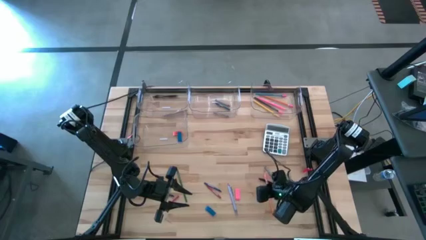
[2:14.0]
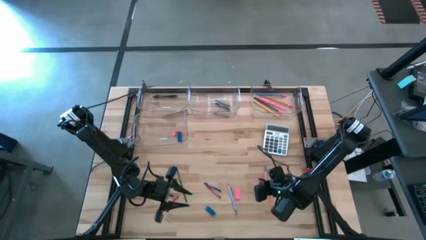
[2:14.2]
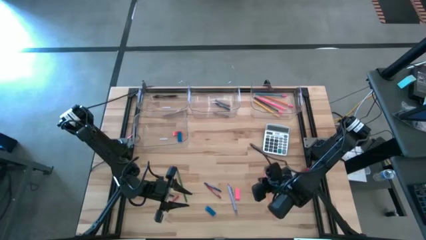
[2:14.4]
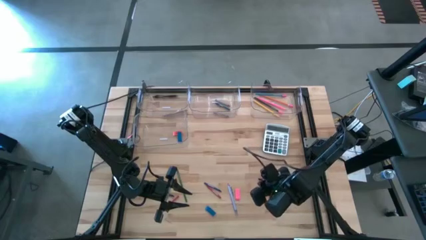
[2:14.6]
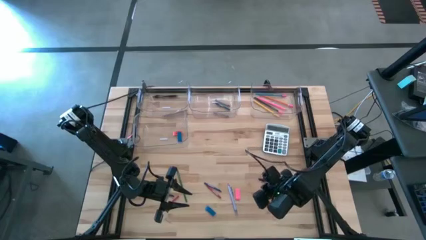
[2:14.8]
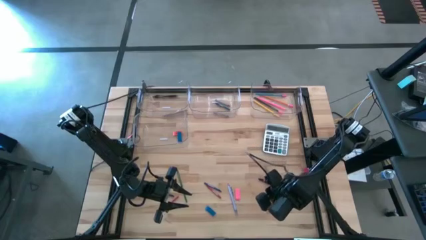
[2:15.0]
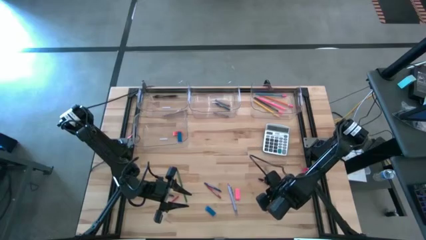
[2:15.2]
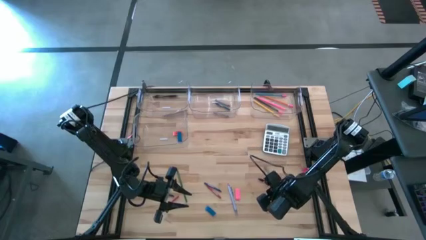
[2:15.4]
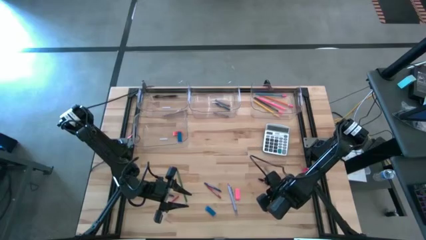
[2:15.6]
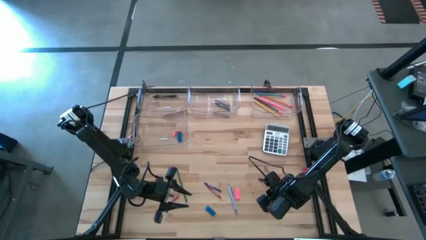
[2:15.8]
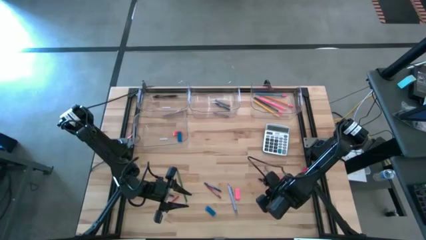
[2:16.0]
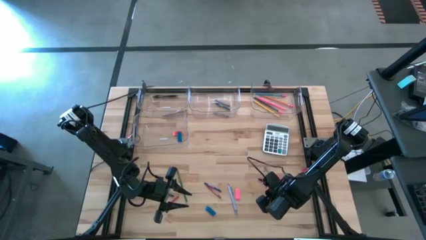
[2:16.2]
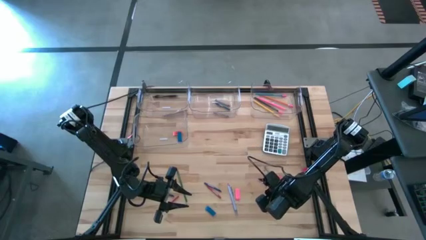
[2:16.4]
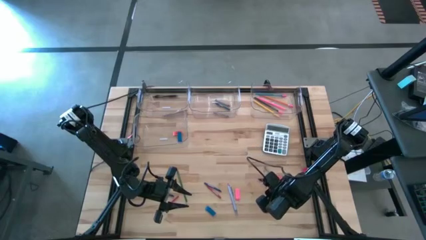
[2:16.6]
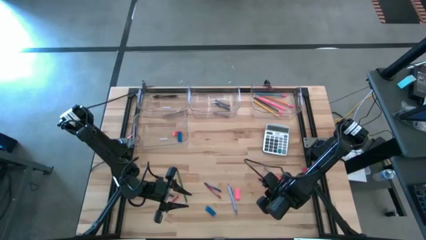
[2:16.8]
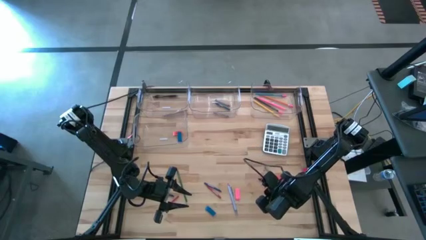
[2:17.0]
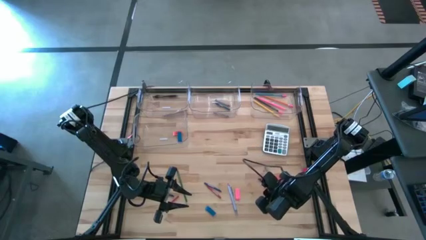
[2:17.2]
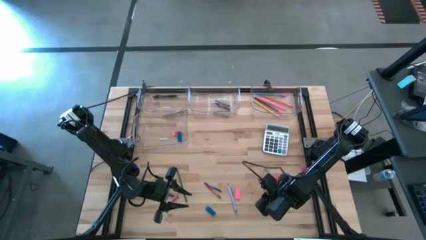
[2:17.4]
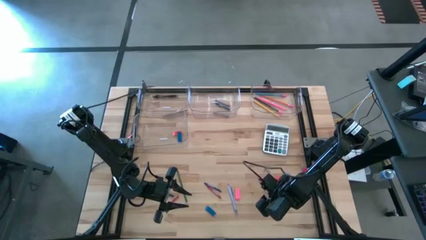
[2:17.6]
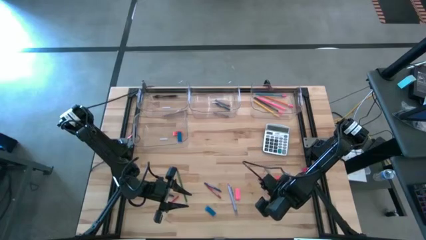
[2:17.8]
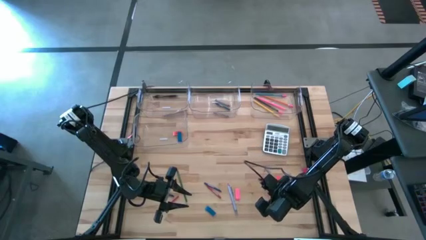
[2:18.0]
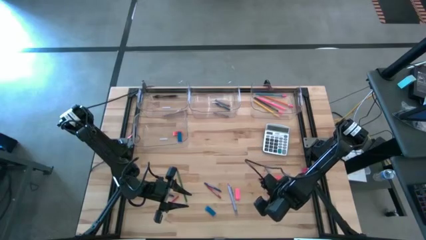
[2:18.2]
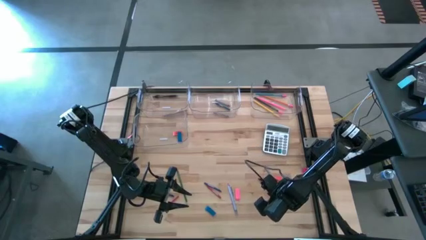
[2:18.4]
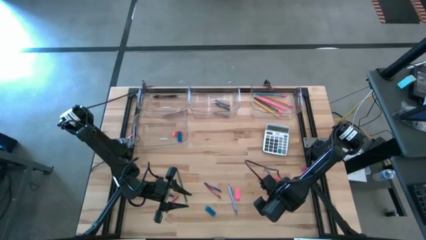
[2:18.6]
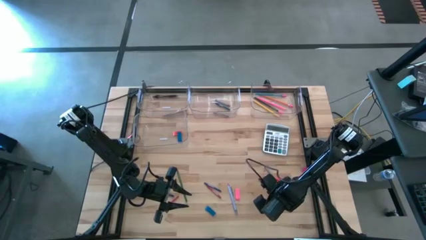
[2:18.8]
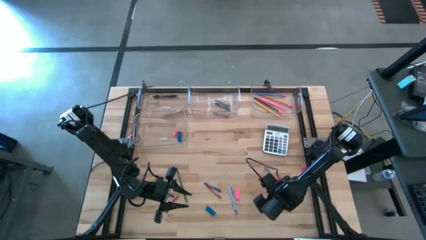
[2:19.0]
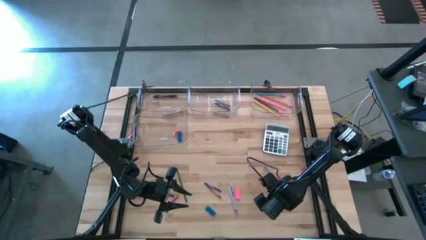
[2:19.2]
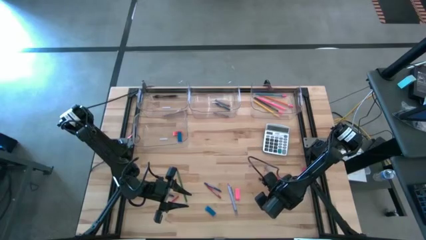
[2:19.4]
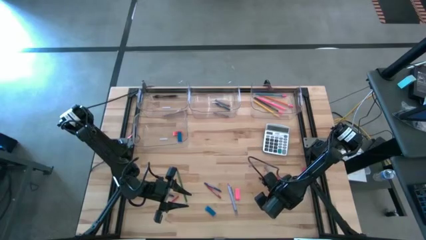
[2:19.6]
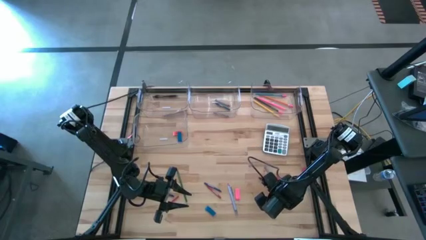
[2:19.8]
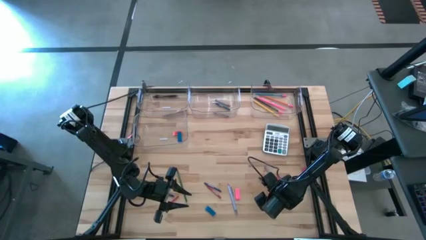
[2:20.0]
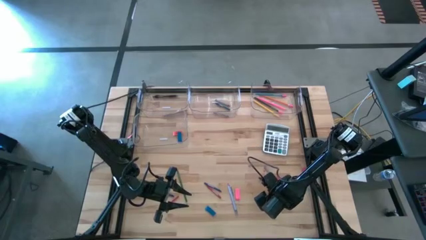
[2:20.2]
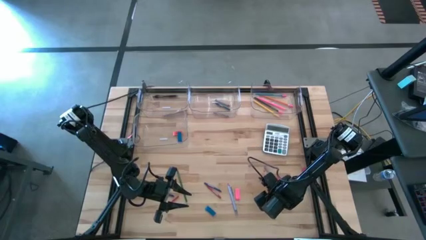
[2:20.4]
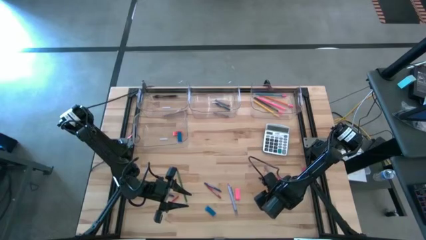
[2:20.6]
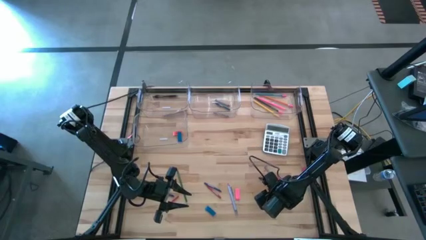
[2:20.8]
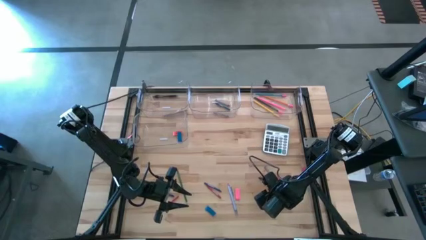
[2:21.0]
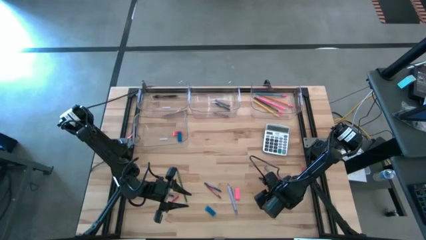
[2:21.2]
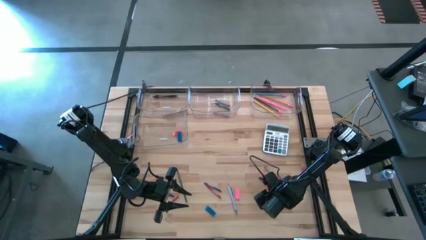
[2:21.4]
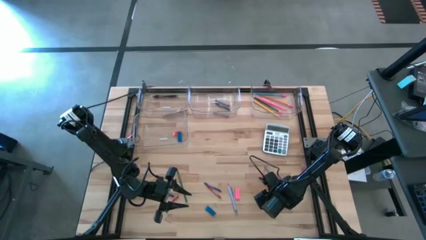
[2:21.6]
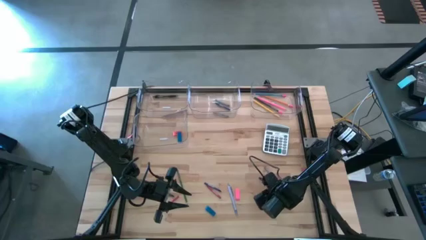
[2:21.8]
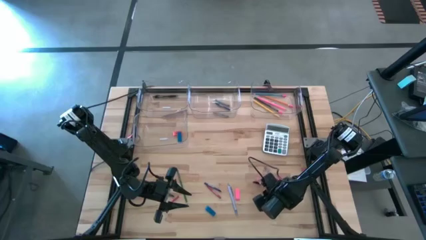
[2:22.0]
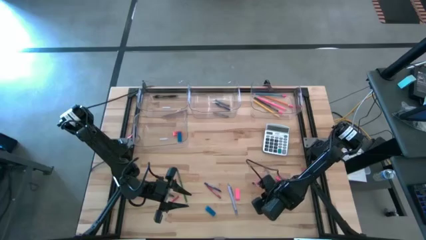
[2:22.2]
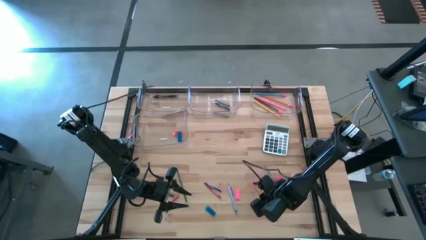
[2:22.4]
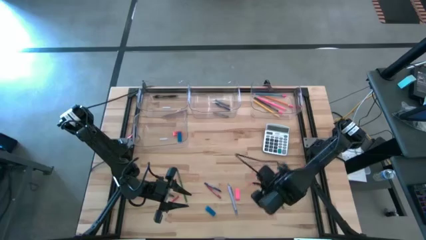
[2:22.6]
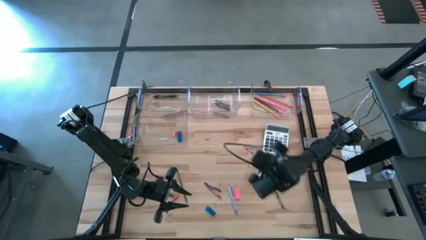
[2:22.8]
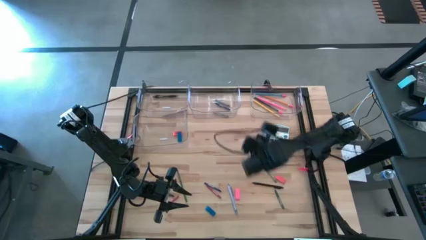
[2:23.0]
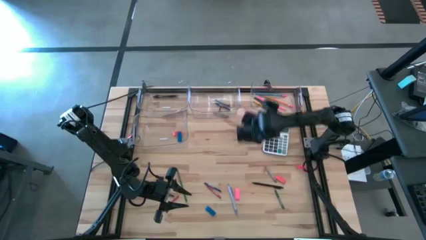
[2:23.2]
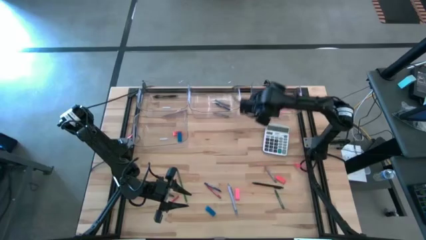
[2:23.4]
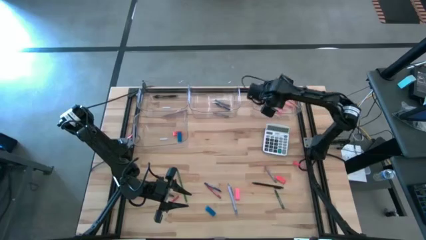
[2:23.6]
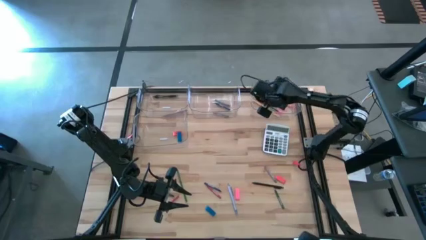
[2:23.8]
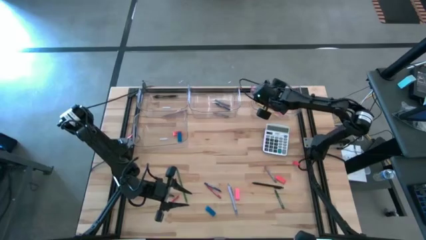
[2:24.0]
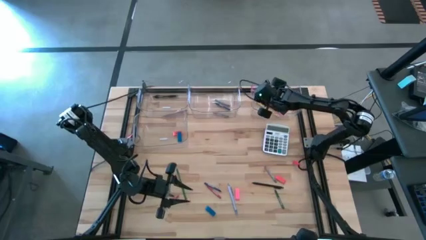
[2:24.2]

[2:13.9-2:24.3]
Task: Sort crayons/erasers/pens/pencils in bins
Put the orange pencil into the top right transparent bin

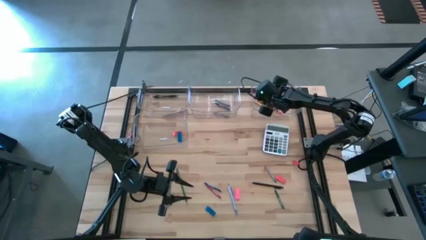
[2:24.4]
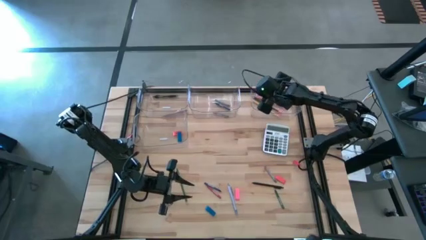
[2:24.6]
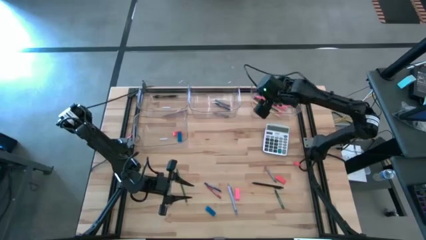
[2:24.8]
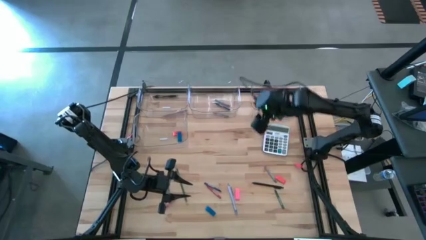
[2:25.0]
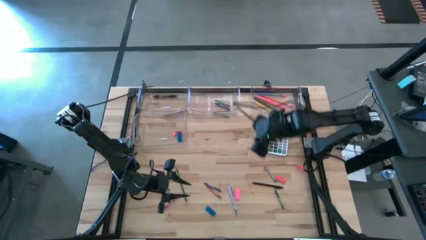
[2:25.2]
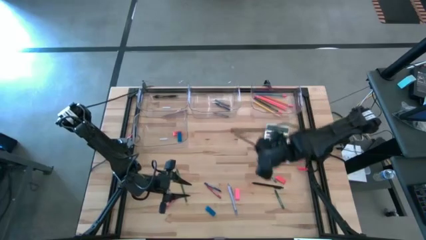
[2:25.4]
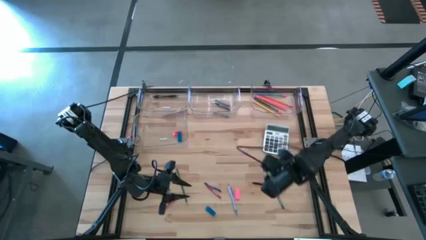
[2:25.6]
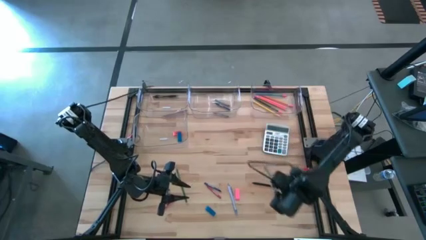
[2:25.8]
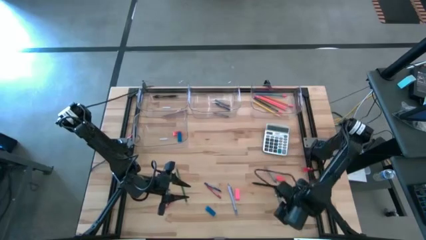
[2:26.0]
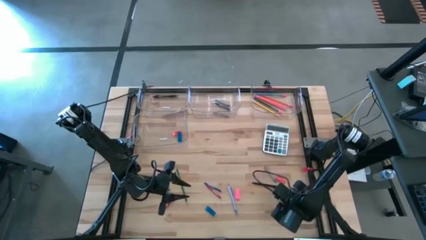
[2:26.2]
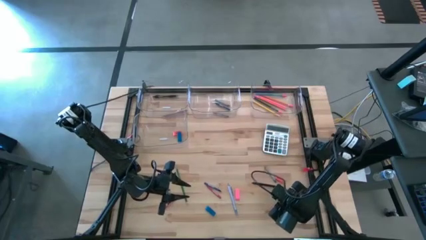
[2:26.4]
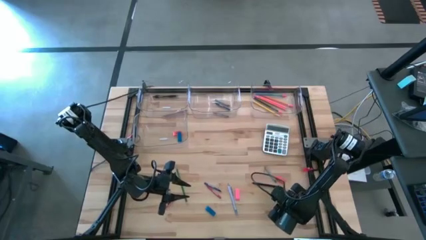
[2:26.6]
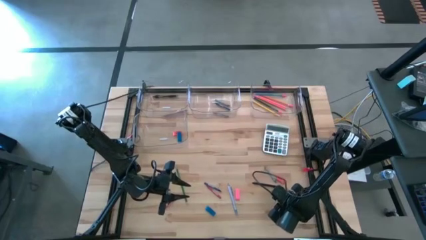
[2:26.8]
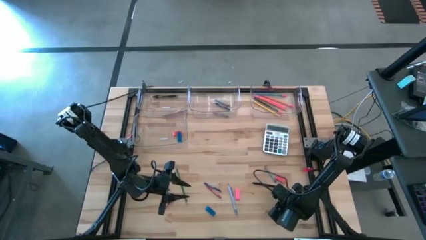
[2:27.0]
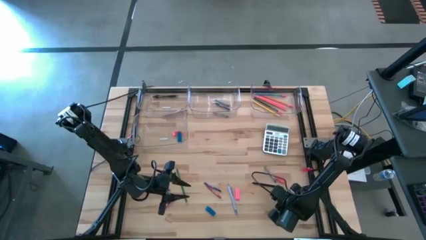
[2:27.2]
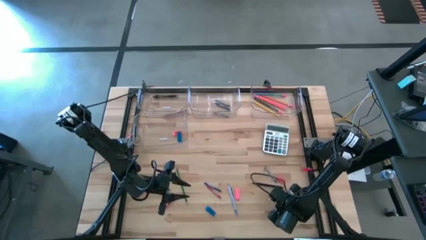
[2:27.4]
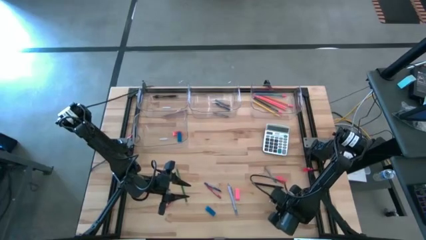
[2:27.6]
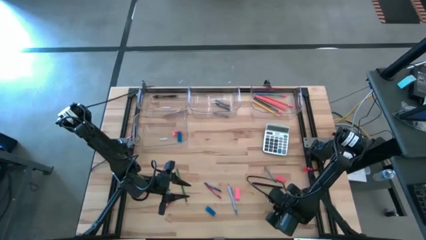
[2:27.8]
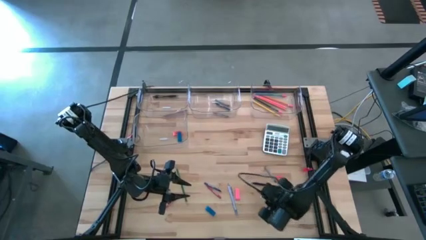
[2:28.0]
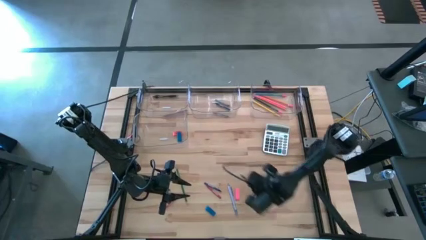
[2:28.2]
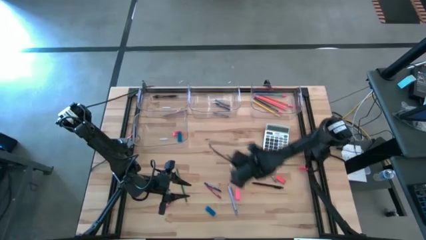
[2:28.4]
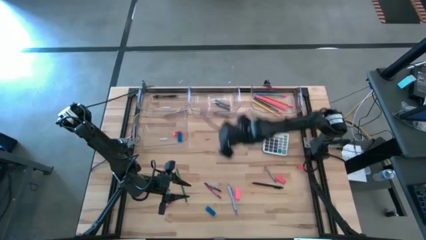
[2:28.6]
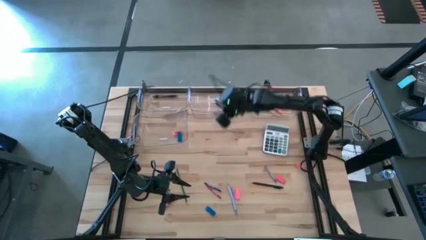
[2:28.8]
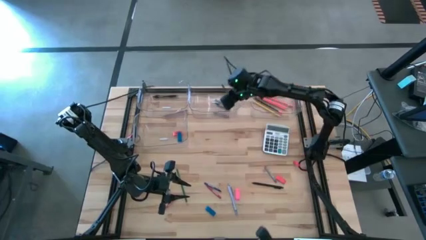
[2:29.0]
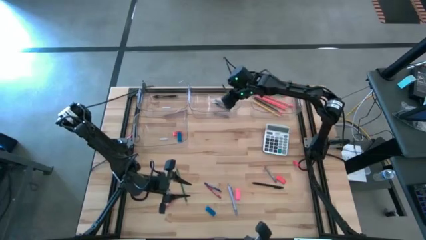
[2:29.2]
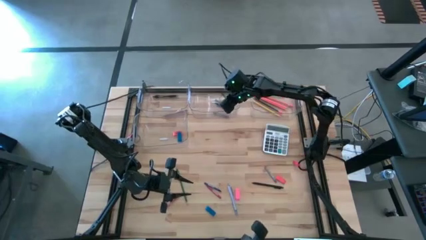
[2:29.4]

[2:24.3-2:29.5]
Put the green crayon into the top center transparent bin

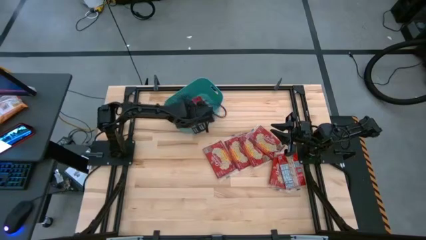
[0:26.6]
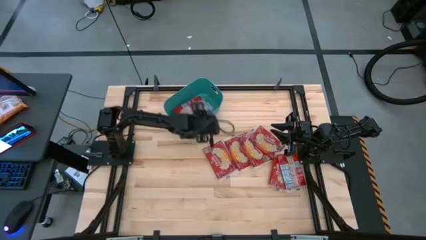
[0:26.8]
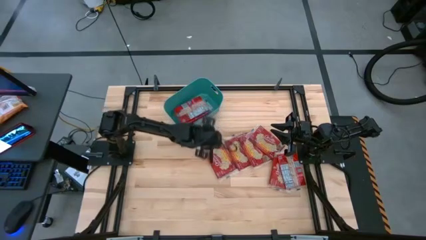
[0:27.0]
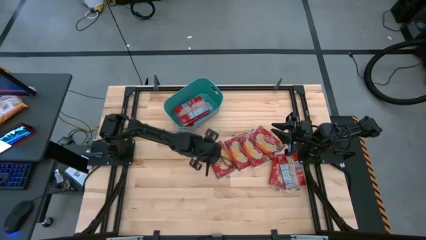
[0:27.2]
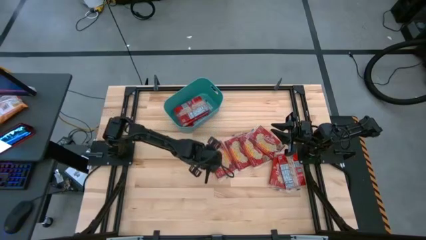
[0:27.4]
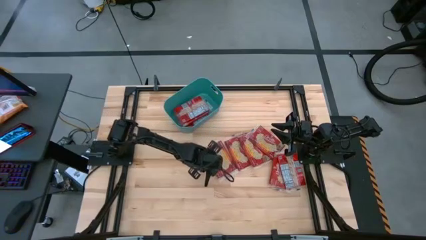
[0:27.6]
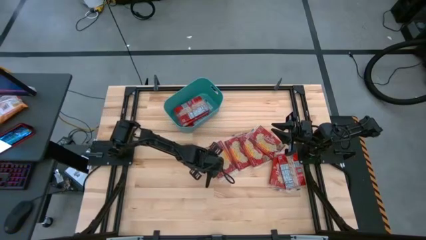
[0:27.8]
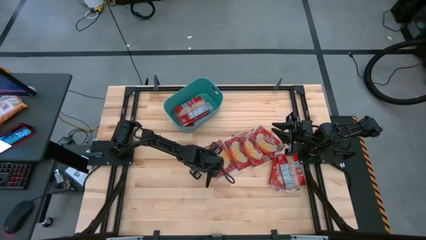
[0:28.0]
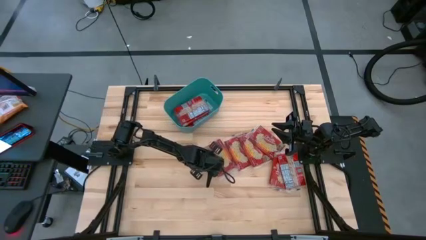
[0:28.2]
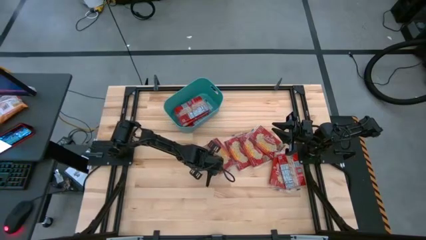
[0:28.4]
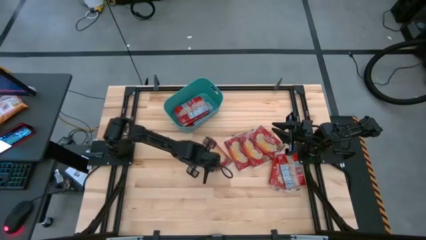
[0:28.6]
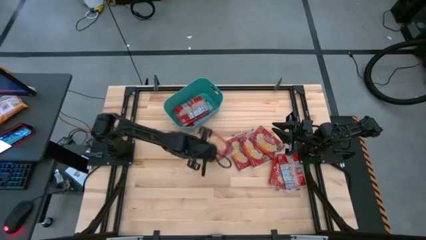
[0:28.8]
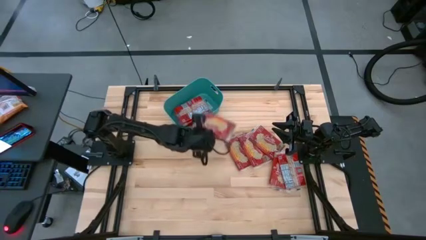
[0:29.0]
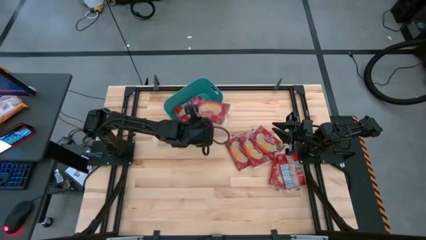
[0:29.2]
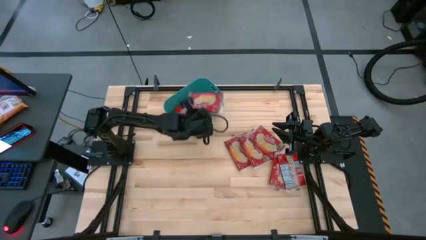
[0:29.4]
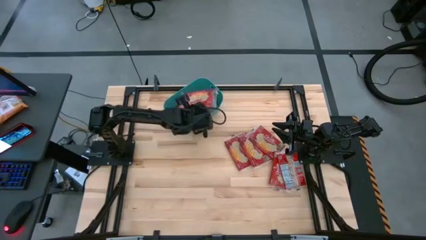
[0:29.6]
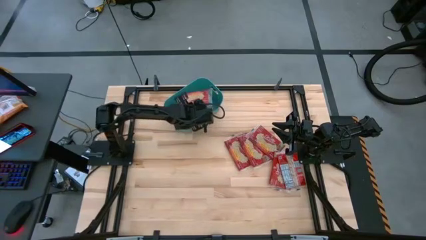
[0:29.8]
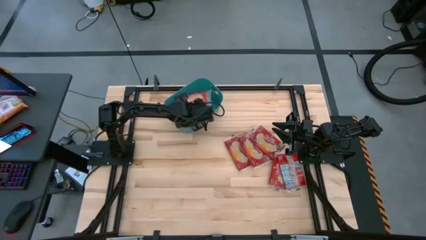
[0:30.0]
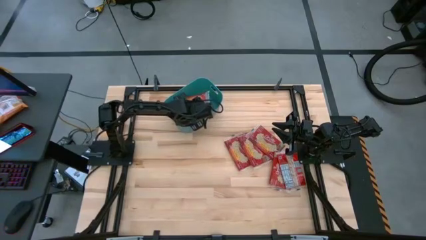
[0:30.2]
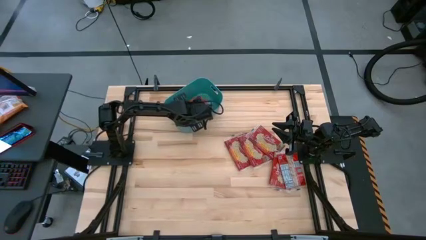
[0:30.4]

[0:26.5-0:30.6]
Task: Sort popcorn bags into baskets
Put the red popcorn bag into the green bin
